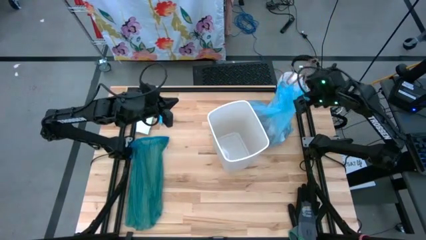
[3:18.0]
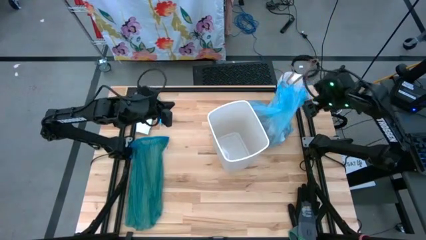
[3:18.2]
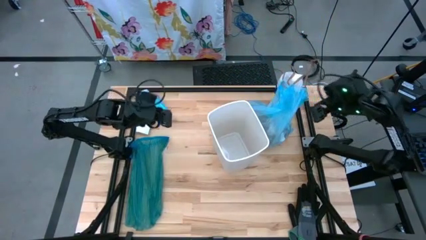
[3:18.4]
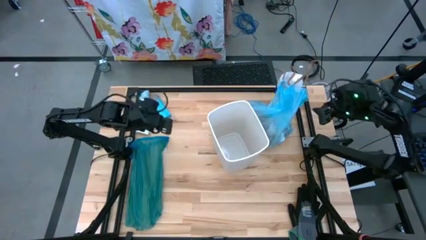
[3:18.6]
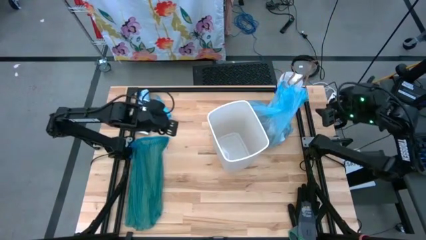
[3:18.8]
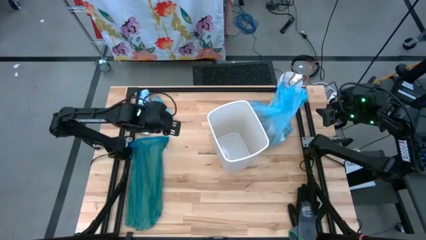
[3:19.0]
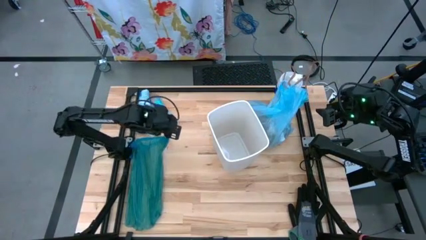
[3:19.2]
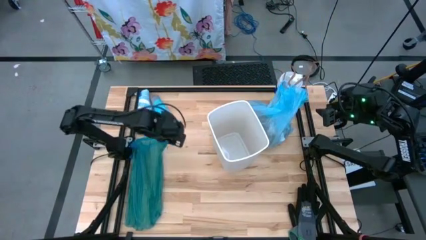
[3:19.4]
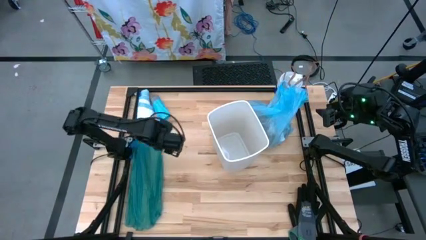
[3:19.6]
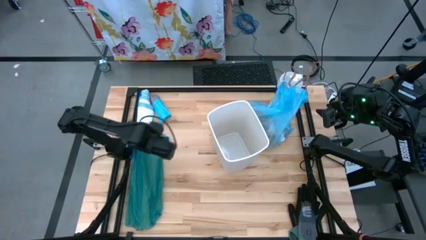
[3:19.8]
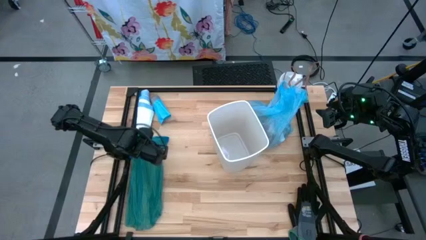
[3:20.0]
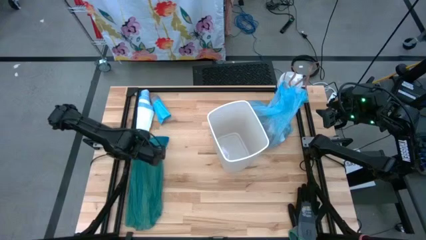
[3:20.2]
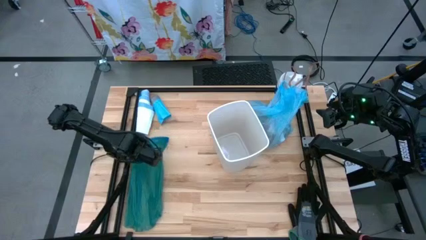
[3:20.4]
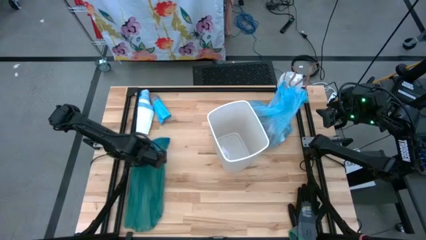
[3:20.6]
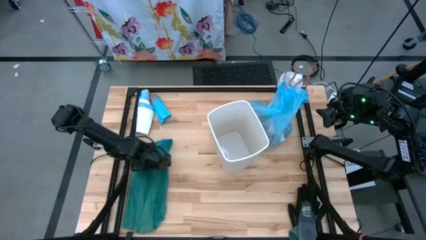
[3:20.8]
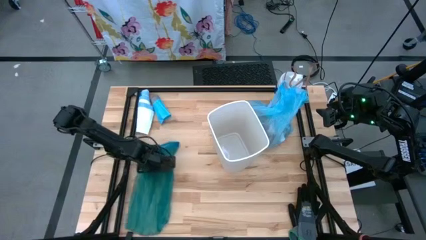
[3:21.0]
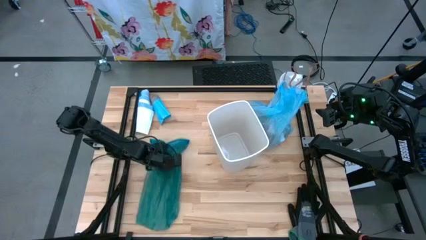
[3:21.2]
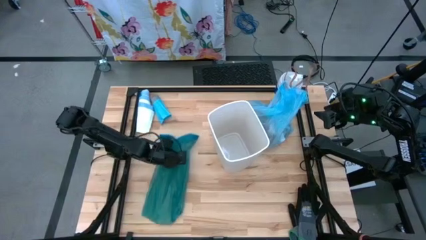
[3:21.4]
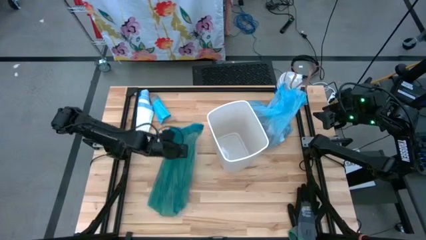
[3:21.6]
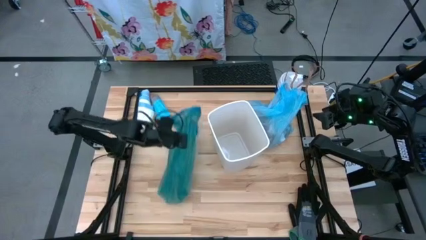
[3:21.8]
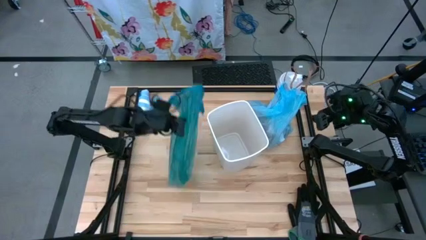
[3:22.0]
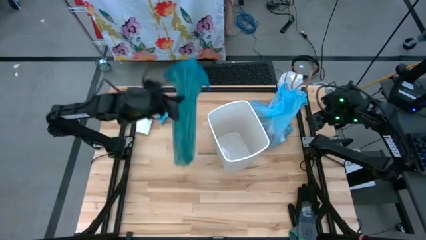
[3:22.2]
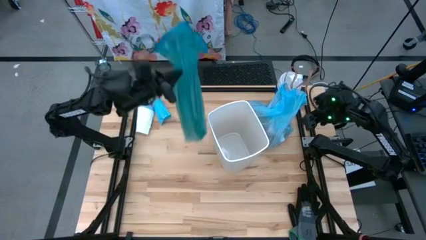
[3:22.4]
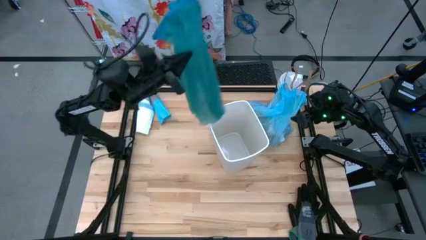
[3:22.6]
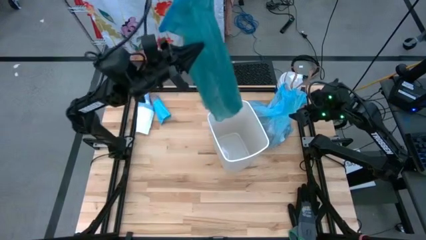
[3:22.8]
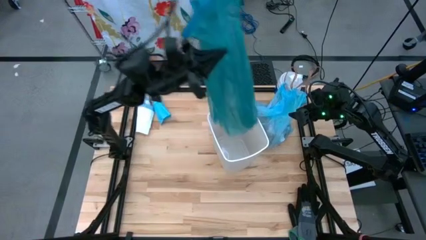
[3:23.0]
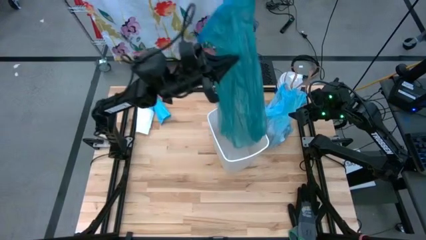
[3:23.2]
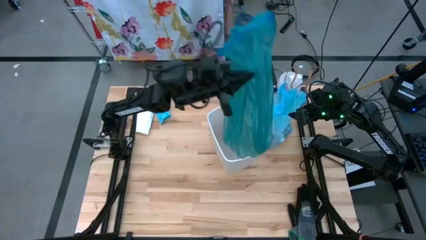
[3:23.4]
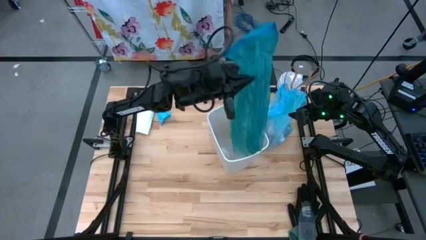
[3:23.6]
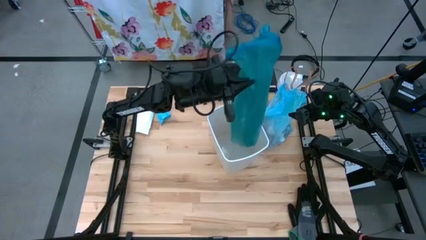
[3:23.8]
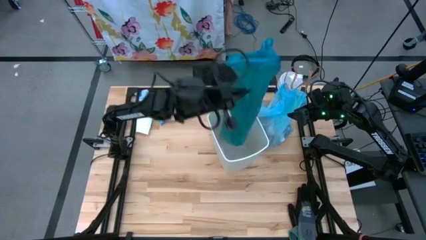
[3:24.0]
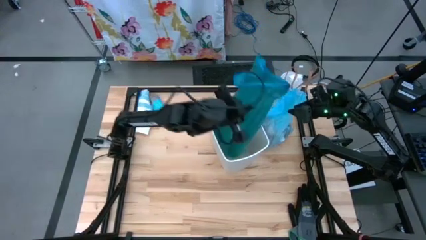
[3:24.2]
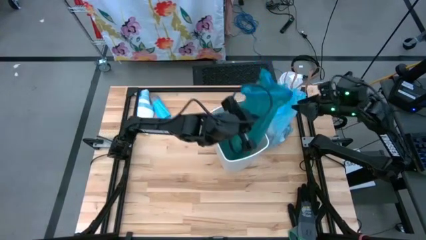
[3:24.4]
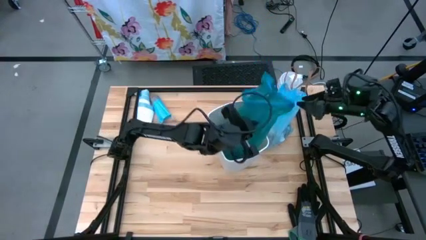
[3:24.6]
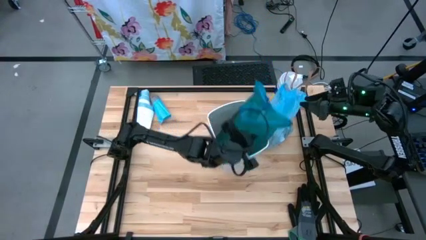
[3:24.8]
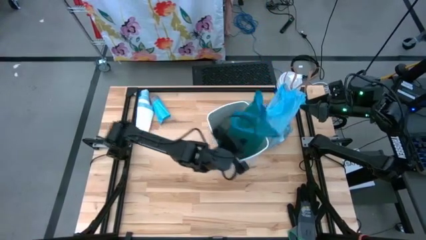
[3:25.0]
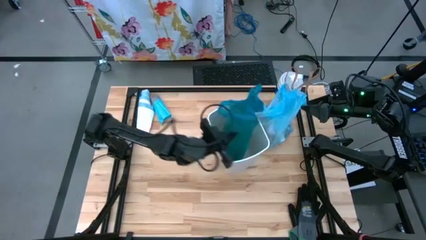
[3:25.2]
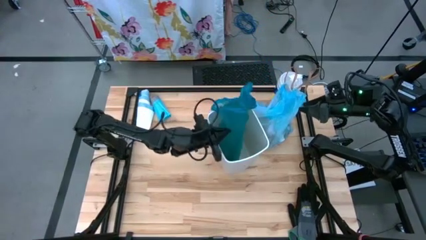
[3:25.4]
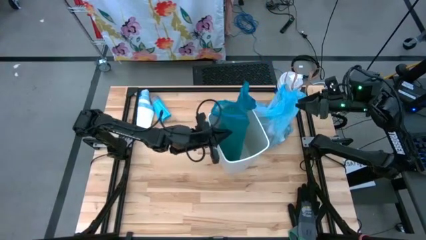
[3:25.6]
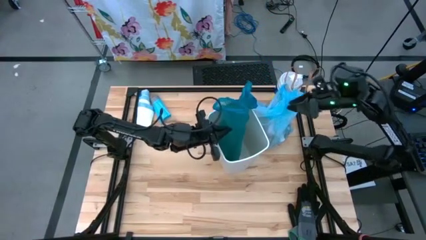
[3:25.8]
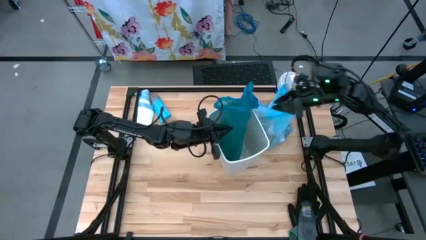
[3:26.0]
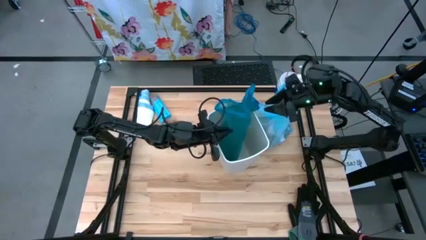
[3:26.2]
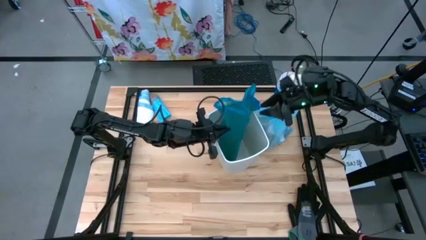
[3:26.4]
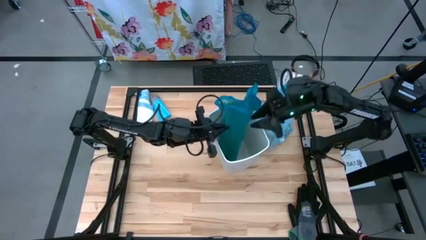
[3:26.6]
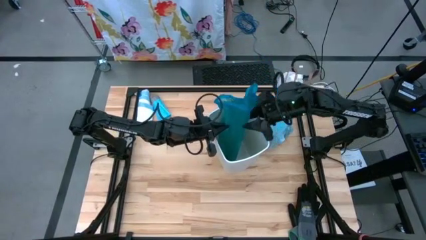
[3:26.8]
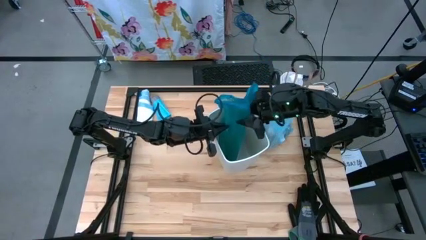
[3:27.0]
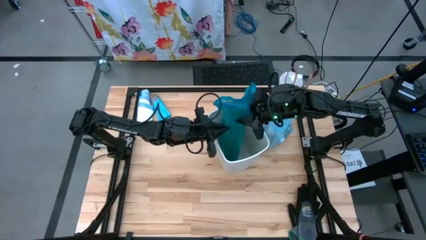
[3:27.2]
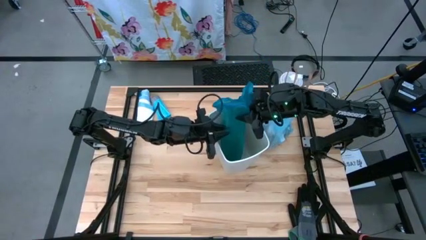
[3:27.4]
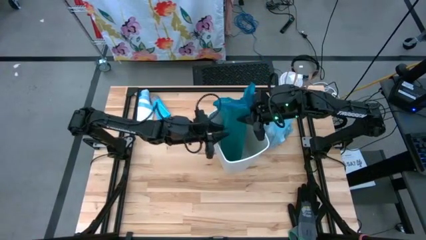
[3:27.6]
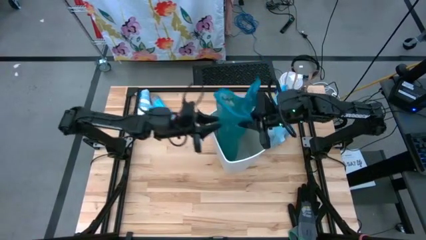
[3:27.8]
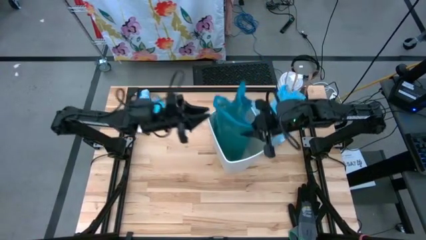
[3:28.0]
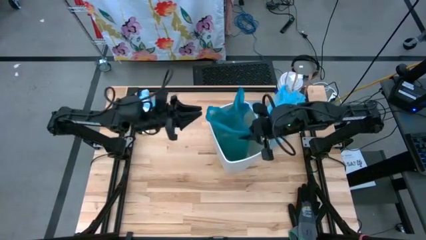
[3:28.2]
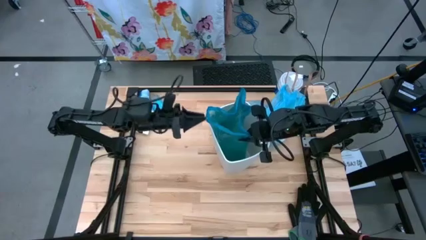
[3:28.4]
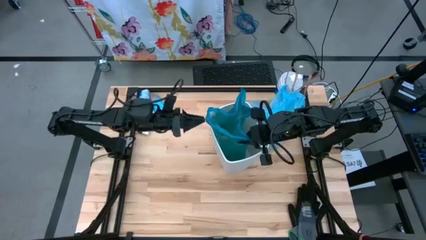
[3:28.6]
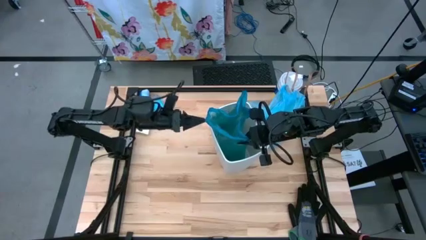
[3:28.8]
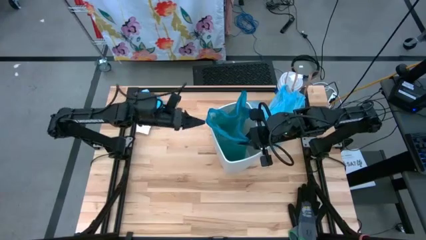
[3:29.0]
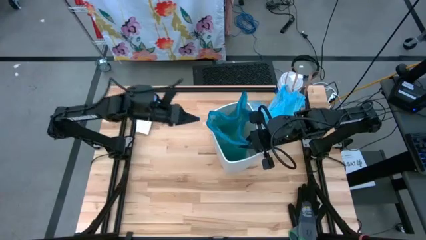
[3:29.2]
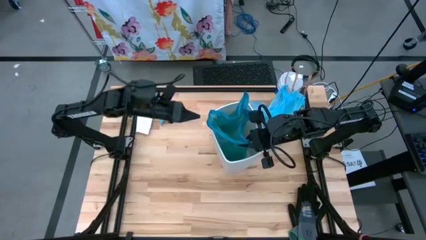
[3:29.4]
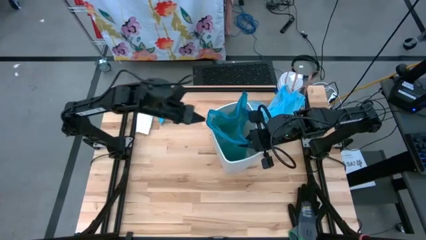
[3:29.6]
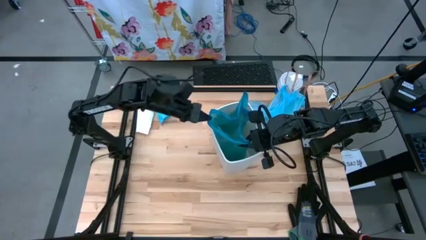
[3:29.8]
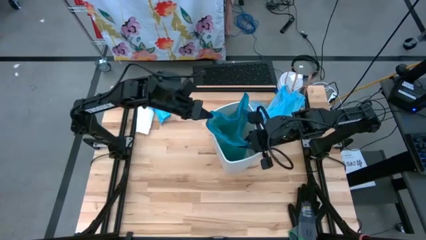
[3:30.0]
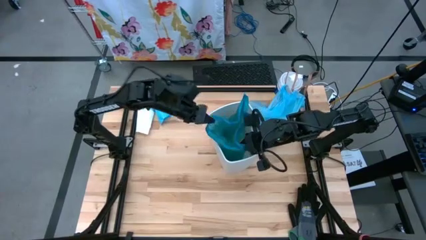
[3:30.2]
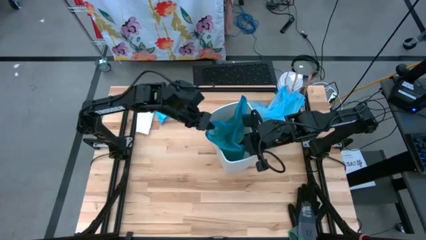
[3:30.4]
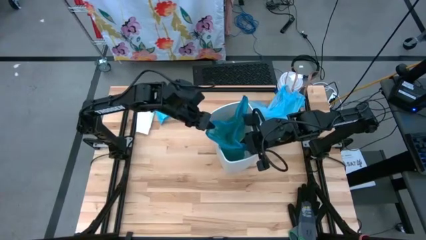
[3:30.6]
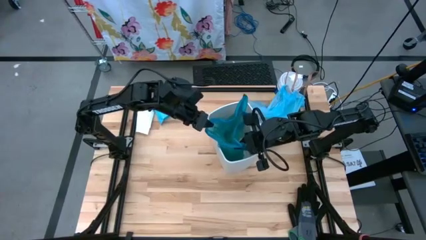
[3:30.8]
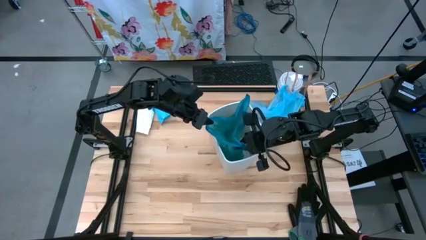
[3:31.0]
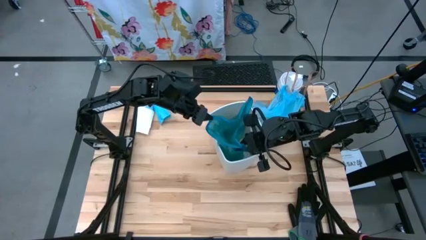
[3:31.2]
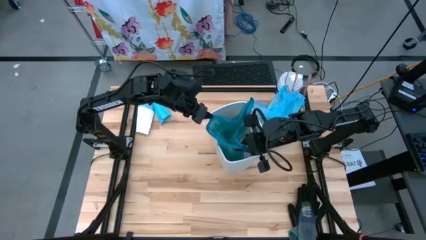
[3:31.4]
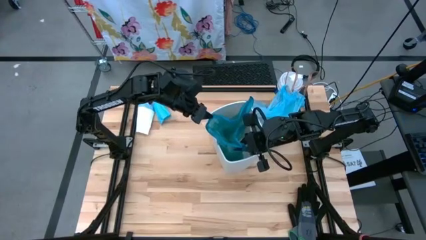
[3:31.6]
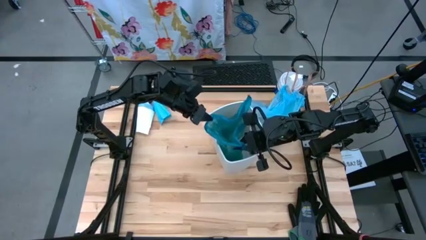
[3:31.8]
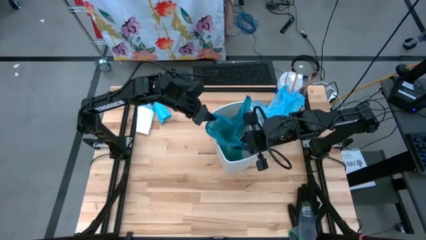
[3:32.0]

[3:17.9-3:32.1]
Task: place trash/remove bag and relplace
Put the blue trash bag into the trash bin
